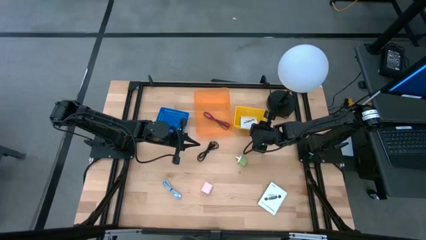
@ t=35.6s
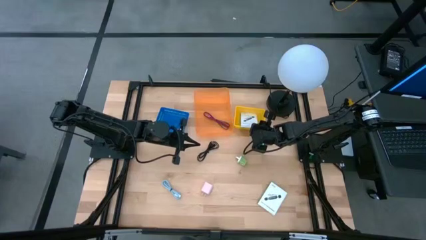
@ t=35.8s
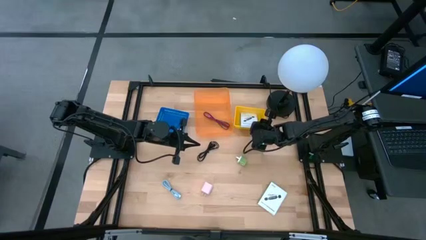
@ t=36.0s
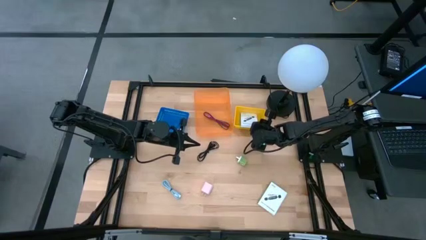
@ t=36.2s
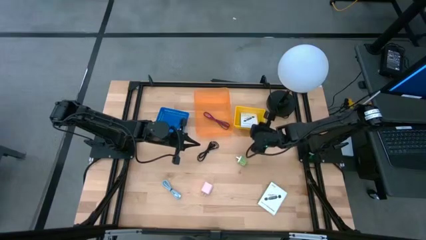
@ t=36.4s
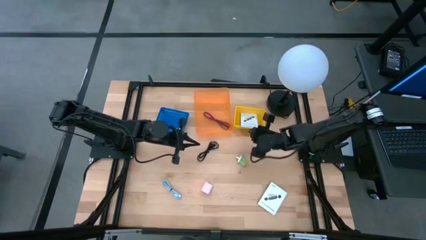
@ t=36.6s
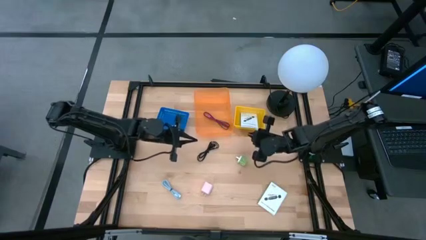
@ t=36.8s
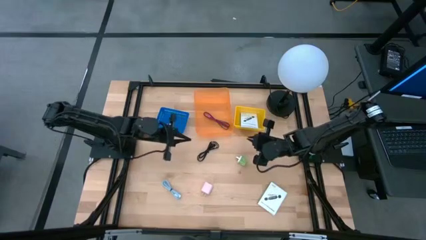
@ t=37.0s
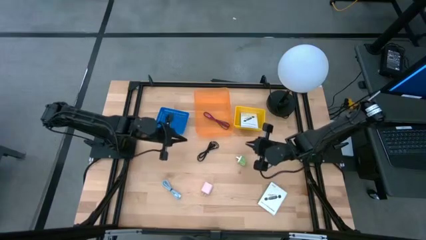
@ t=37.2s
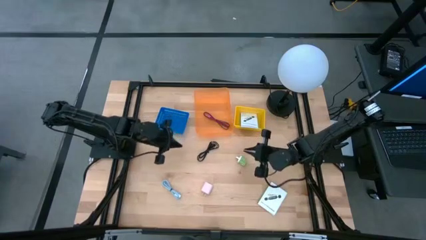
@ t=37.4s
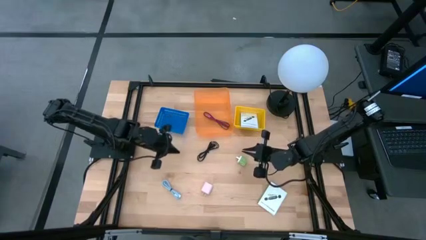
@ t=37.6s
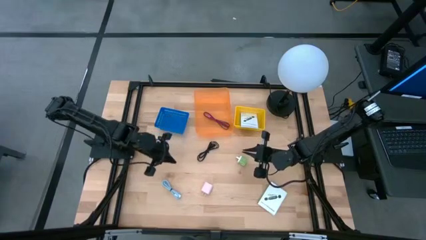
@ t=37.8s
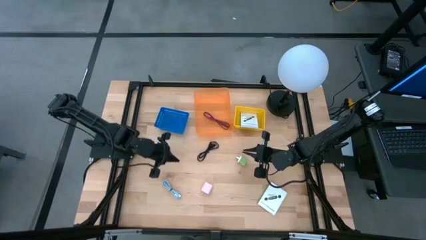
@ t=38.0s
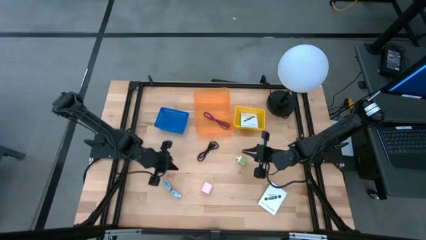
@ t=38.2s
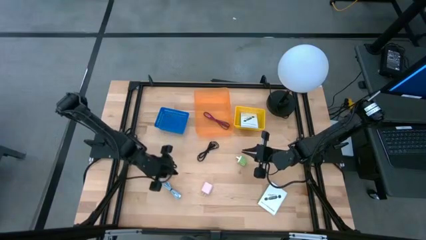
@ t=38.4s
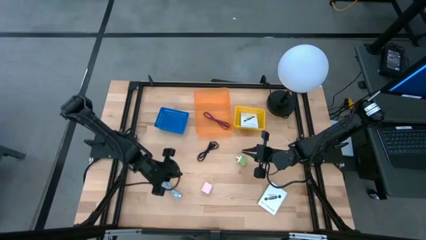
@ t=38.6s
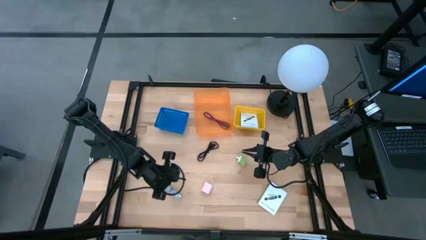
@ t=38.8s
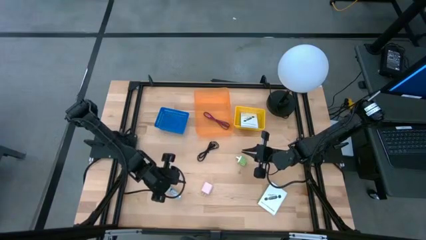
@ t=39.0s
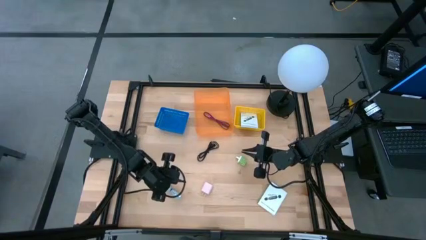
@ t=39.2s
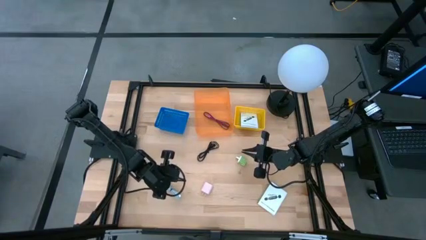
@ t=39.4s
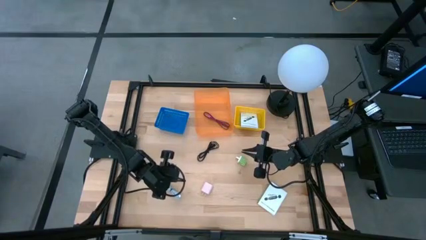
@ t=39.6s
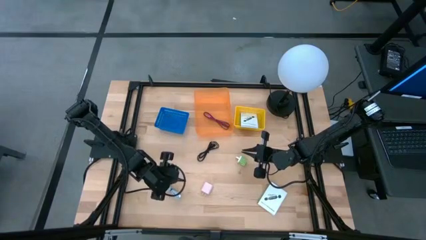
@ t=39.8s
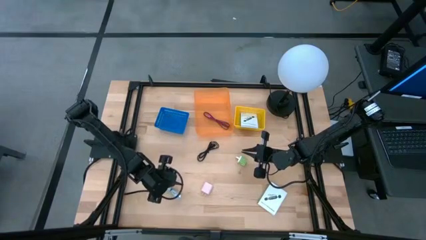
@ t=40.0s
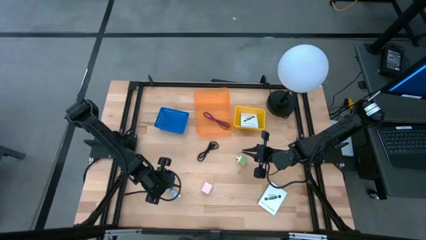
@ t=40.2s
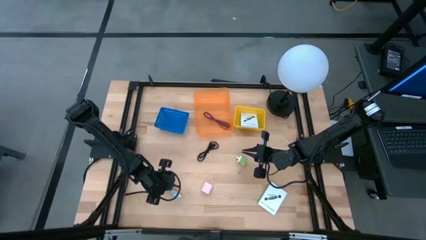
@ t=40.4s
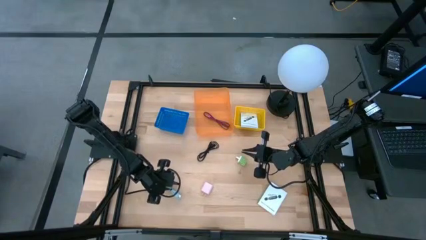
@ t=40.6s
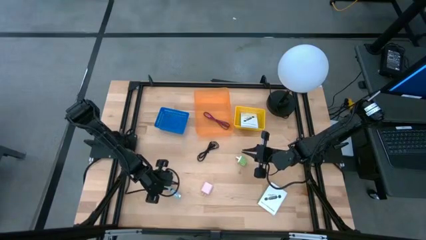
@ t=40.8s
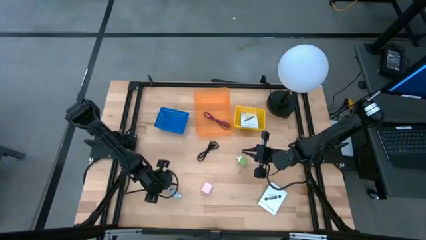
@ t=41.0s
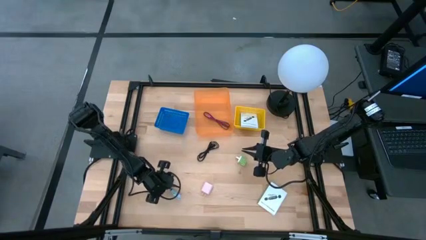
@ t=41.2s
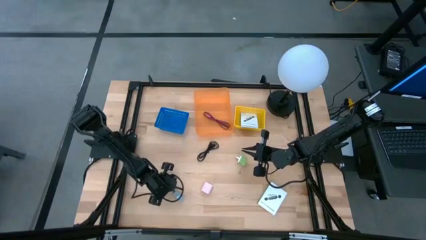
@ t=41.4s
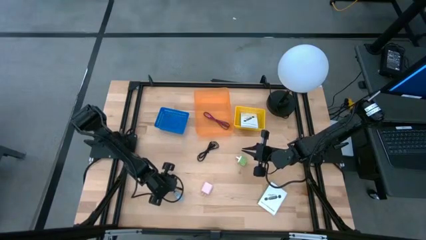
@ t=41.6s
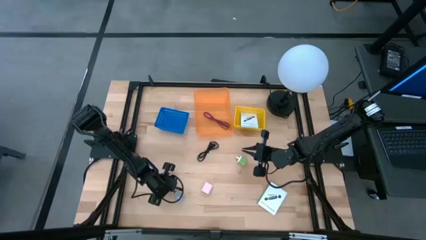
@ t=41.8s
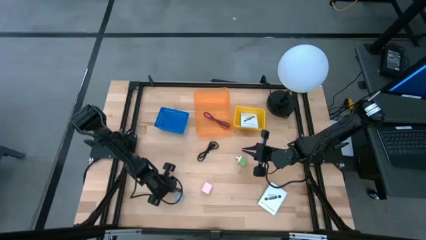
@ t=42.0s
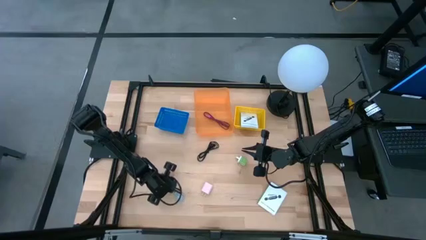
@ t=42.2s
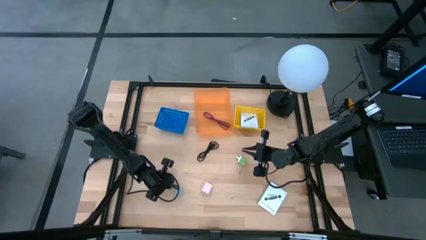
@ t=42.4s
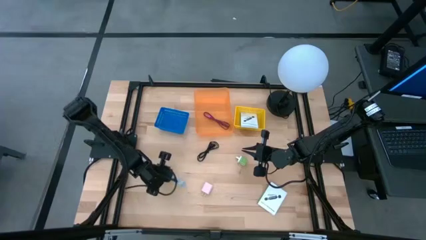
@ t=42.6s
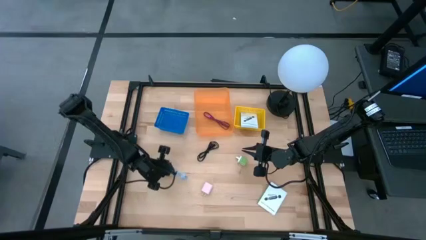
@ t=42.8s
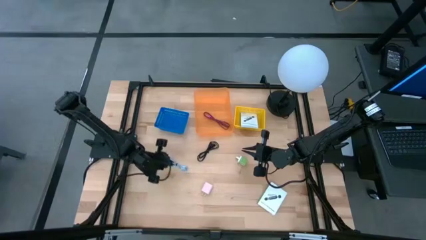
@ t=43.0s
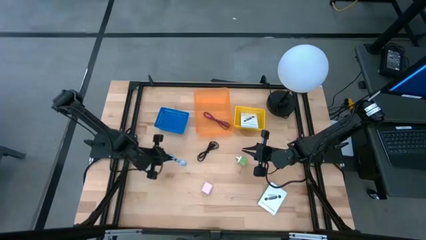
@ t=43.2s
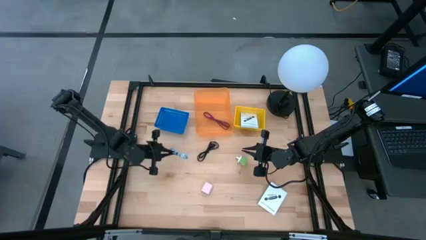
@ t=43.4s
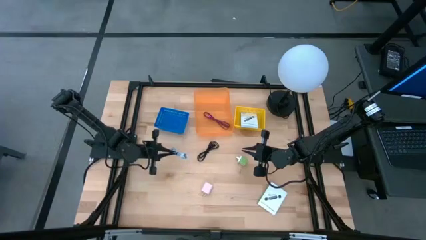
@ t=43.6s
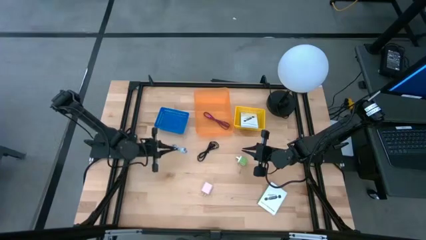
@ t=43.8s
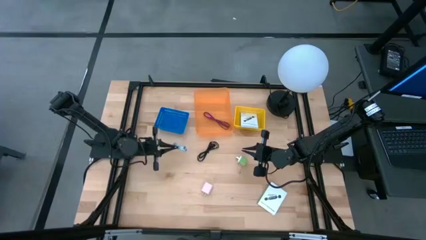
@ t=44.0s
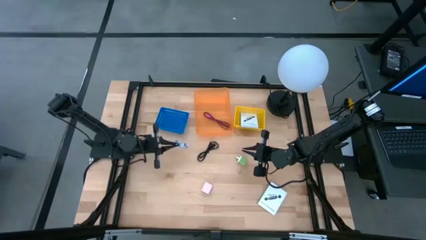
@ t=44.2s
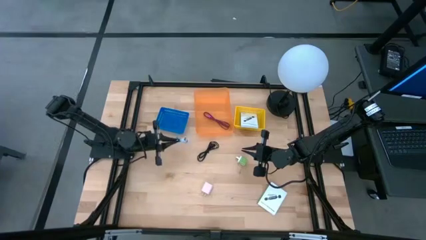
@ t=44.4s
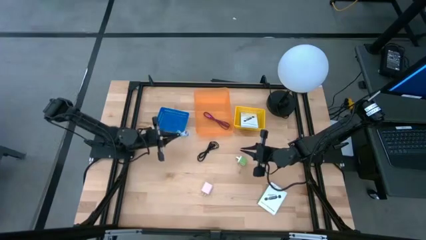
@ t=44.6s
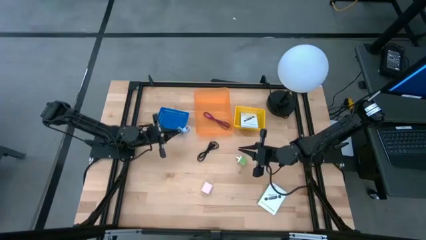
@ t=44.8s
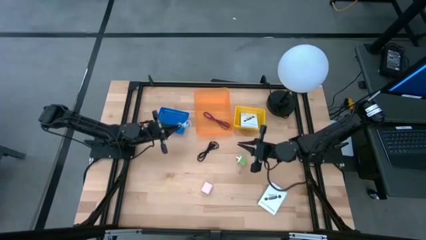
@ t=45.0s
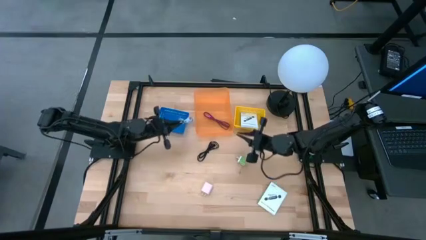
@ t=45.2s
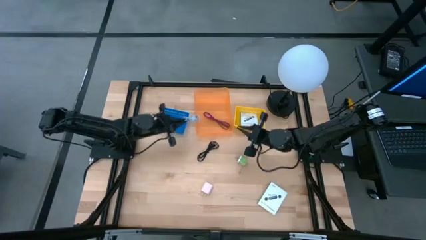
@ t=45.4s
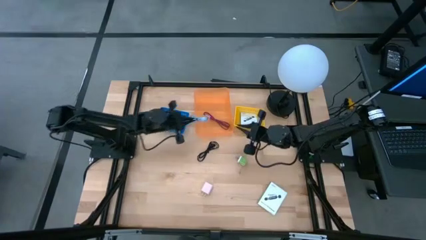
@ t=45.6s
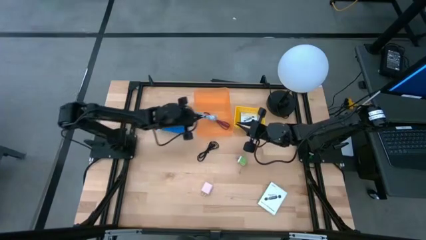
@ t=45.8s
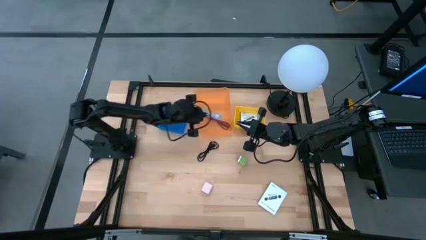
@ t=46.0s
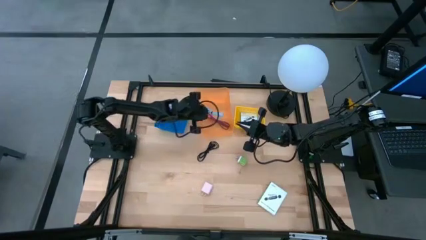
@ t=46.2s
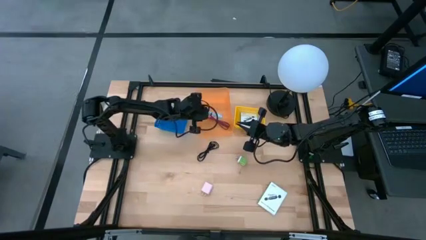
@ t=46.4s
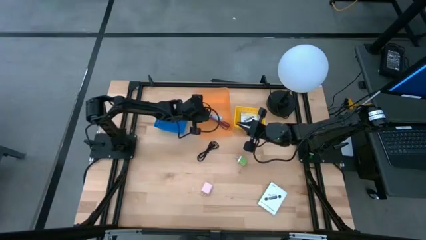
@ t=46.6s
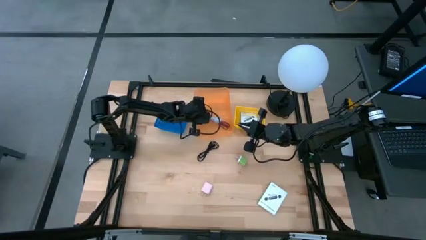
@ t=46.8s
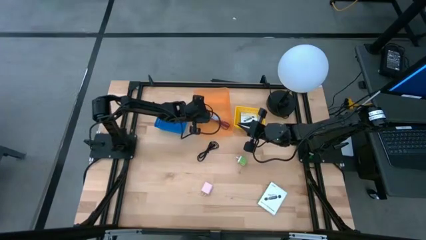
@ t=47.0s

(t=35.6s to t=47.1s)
Task: Pick and place items into bin
Put the blue charger cable into the orange bin
